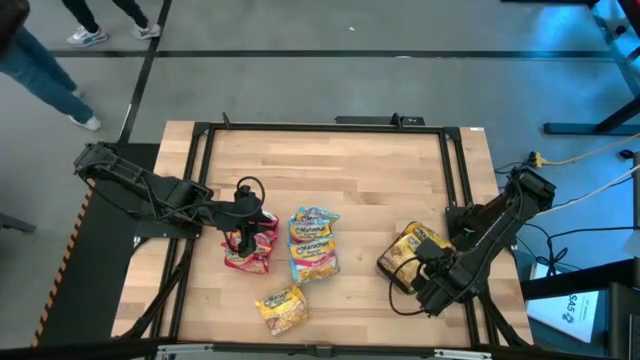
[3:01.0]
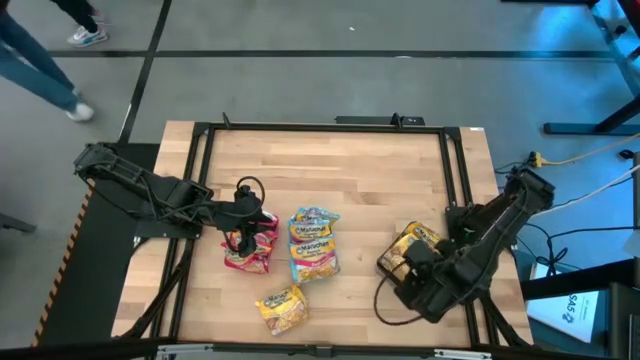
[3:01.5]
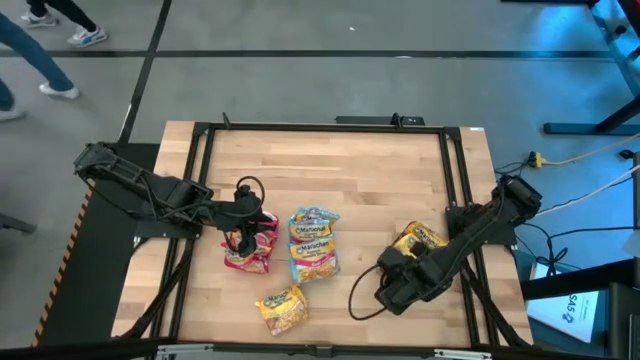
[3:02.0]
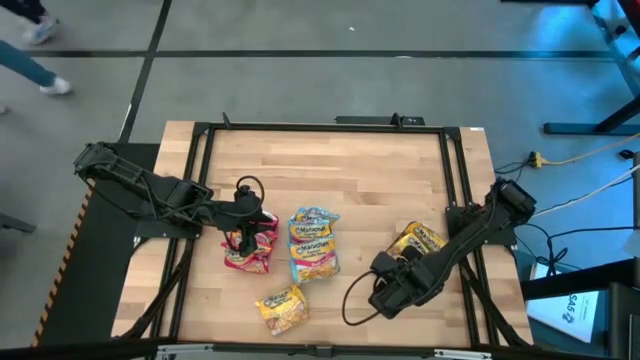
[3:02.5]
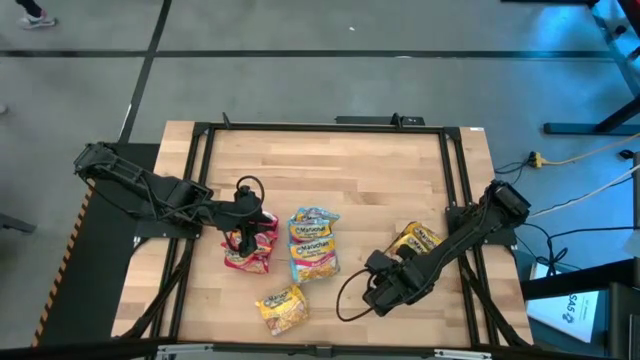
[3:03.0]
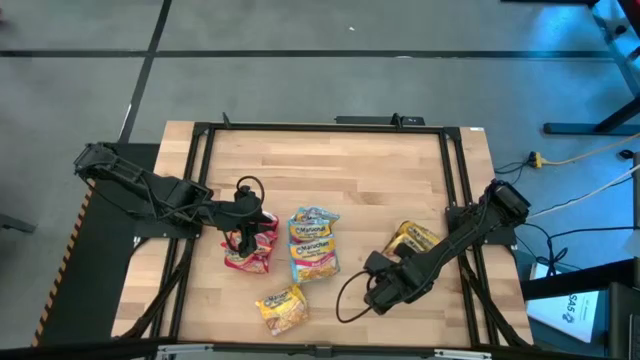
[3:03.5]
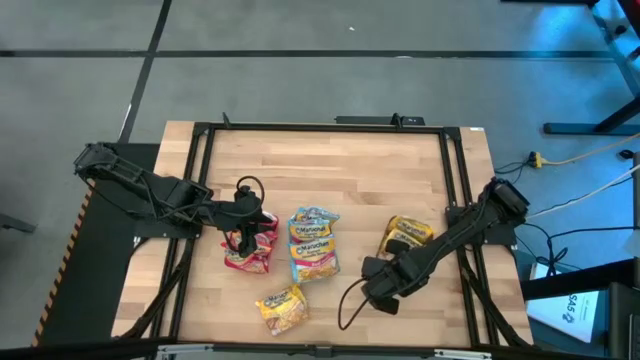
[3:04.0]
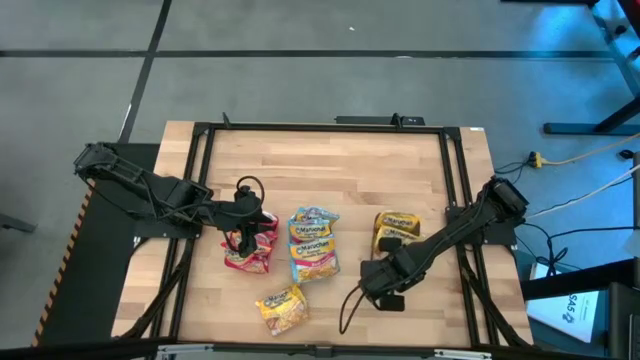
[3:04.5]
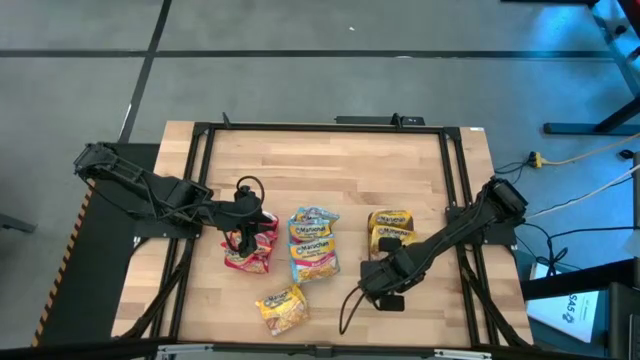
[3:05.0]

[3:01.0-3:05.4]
Task: Sort Maruchan noodles
Adjust the black bin

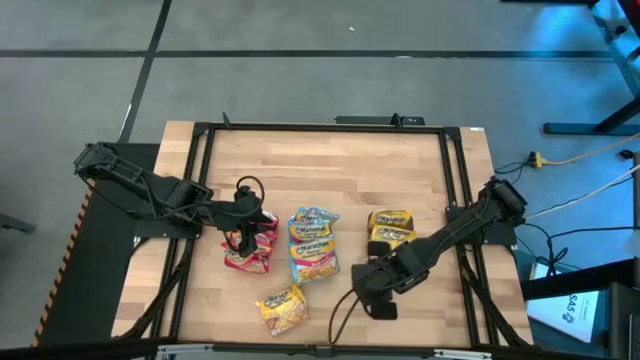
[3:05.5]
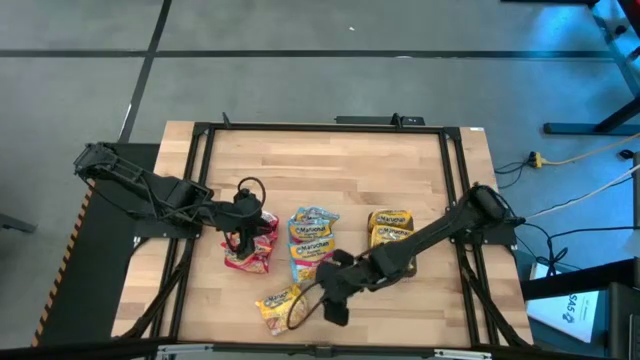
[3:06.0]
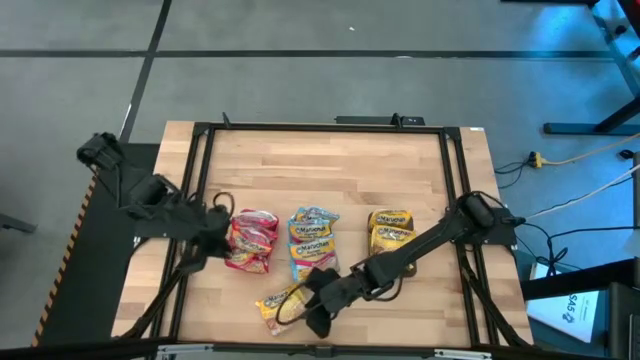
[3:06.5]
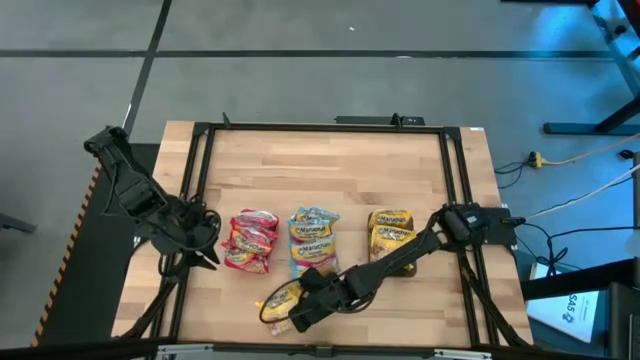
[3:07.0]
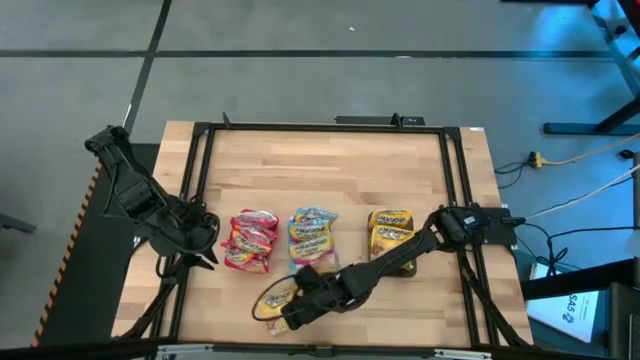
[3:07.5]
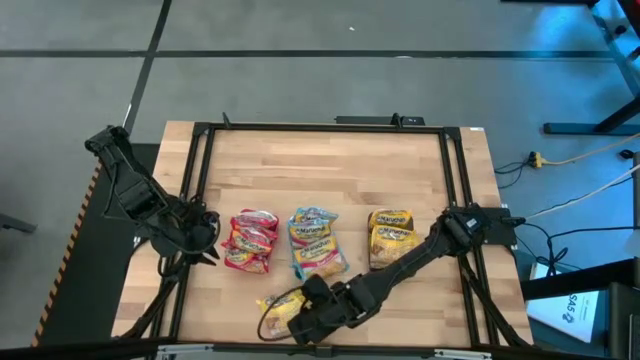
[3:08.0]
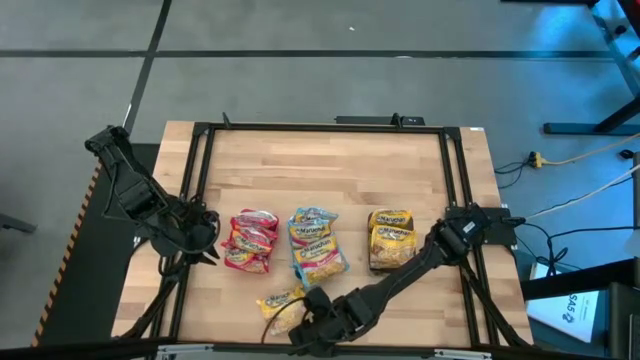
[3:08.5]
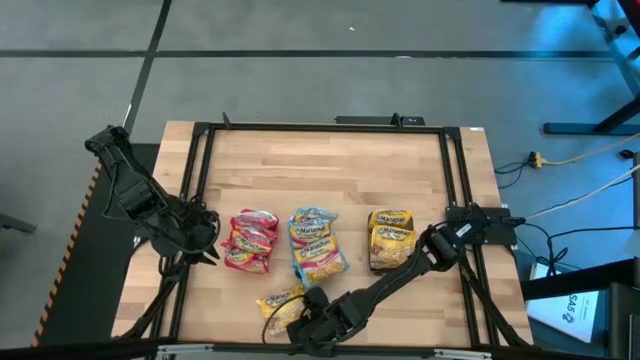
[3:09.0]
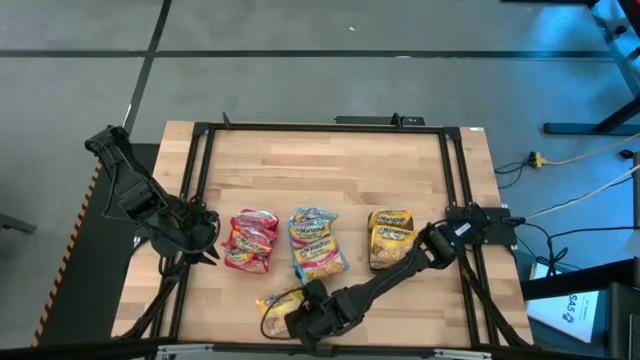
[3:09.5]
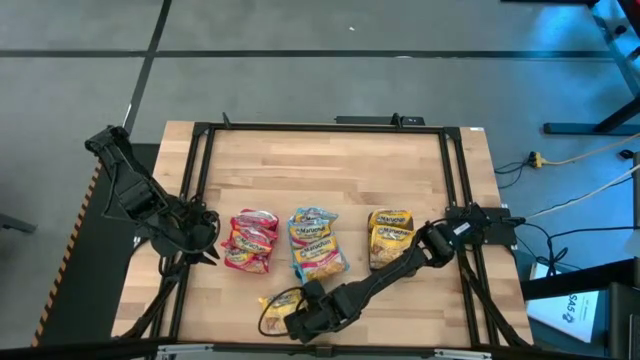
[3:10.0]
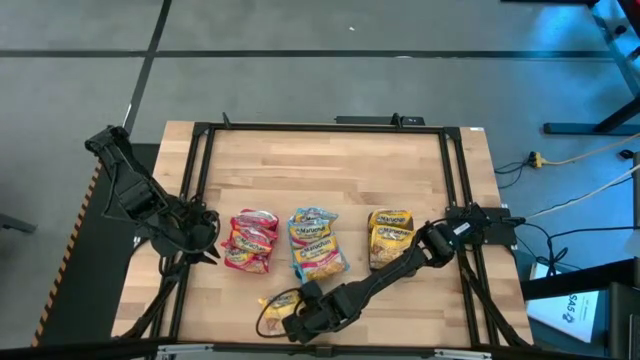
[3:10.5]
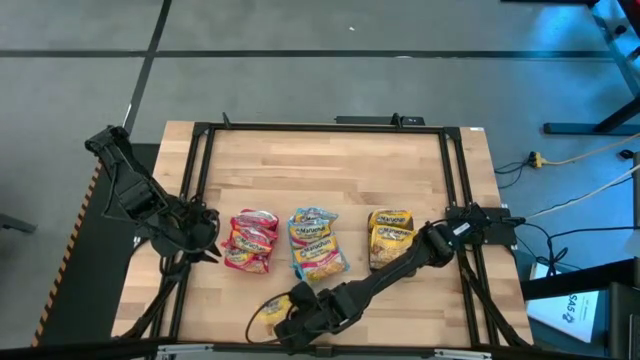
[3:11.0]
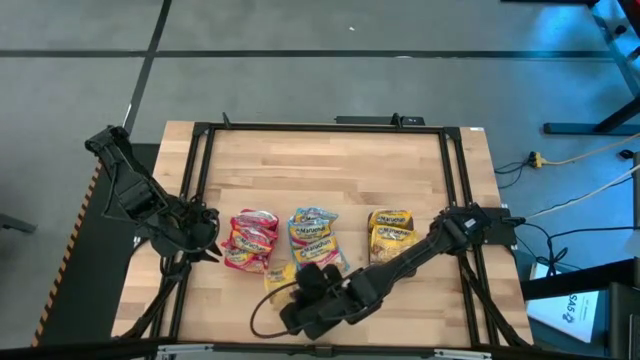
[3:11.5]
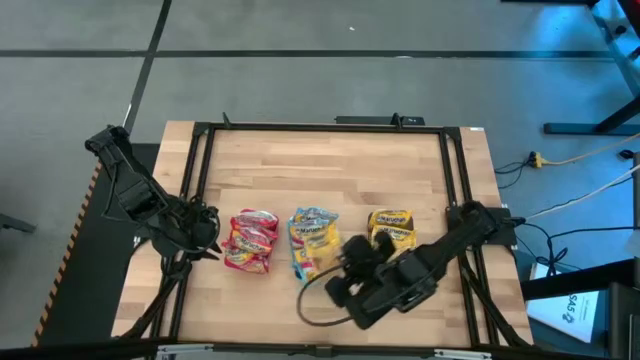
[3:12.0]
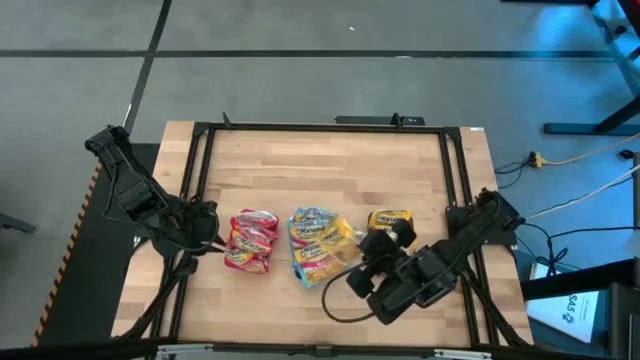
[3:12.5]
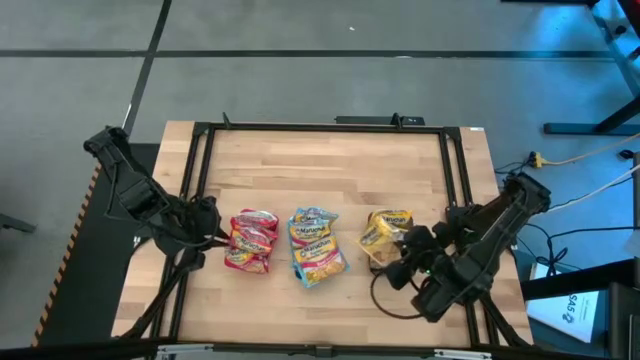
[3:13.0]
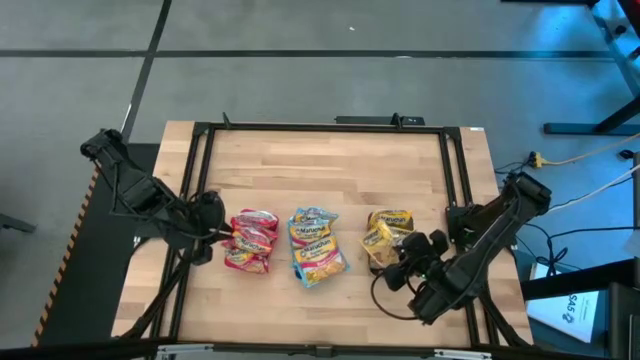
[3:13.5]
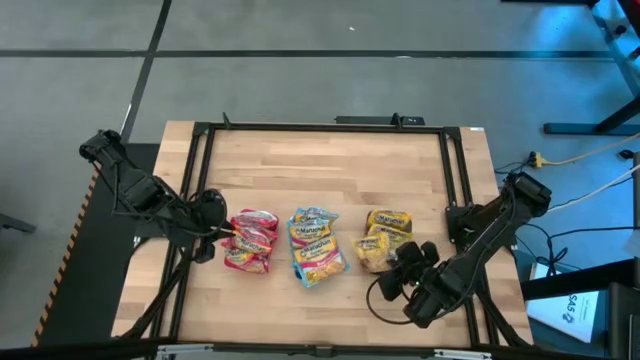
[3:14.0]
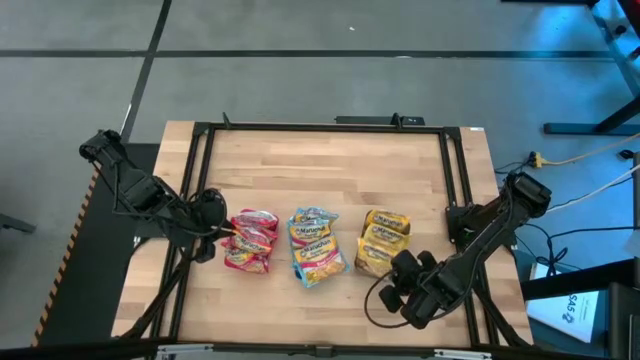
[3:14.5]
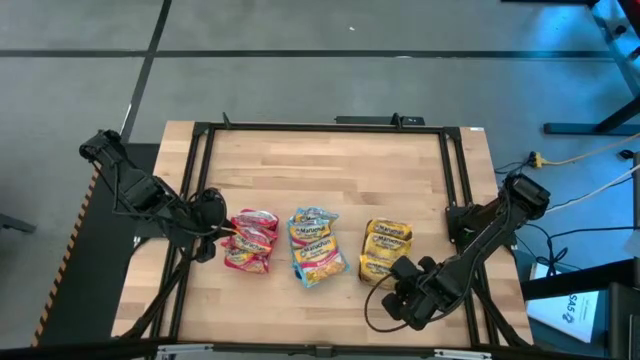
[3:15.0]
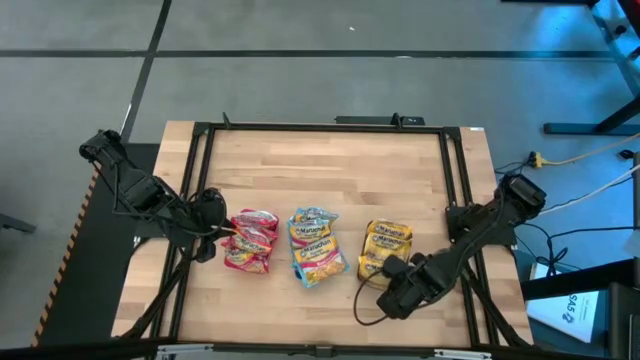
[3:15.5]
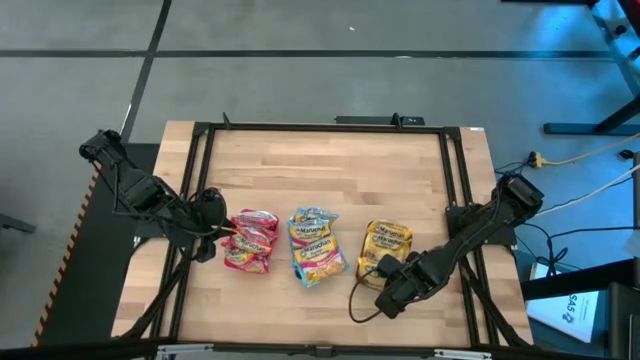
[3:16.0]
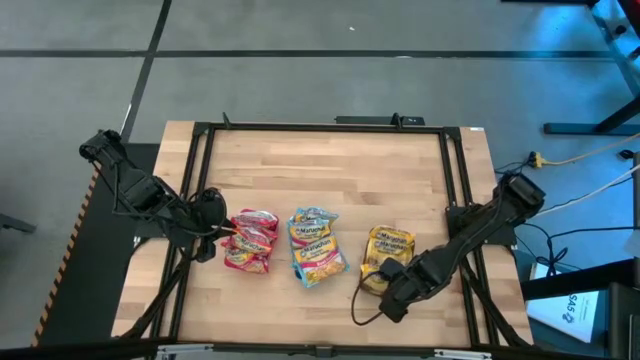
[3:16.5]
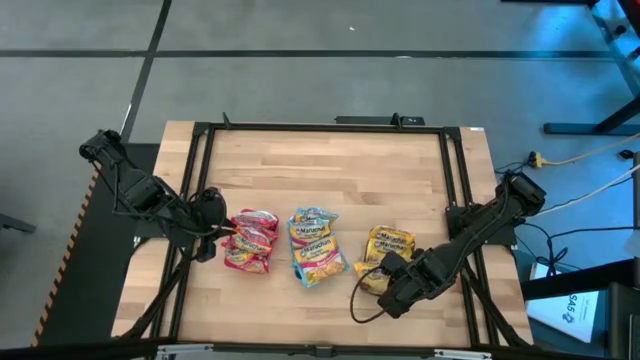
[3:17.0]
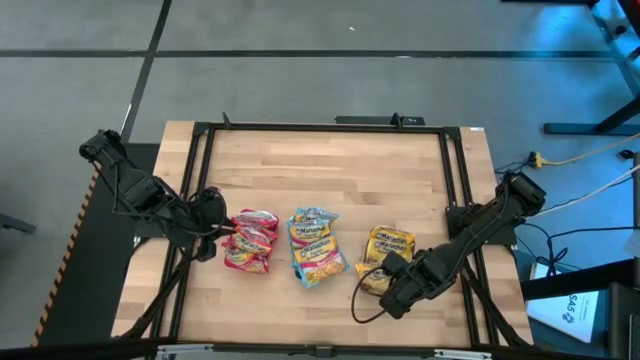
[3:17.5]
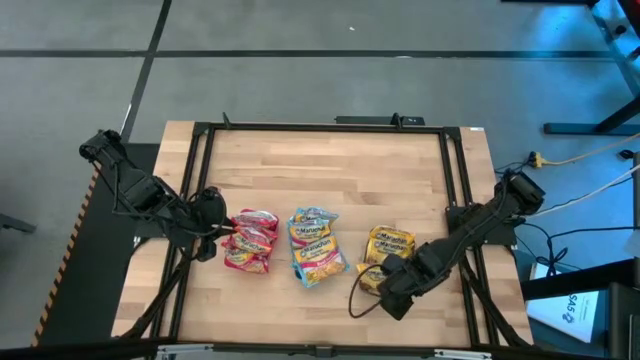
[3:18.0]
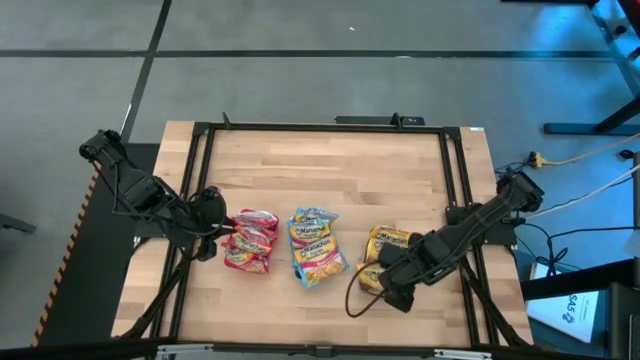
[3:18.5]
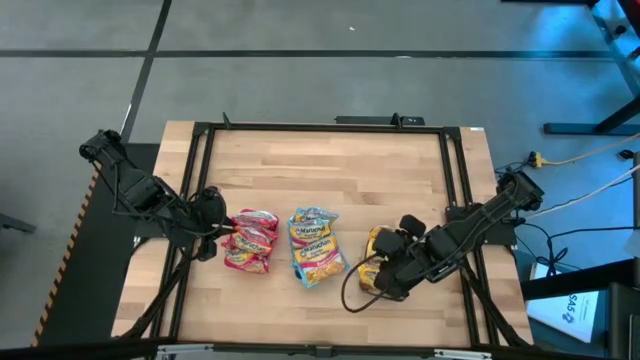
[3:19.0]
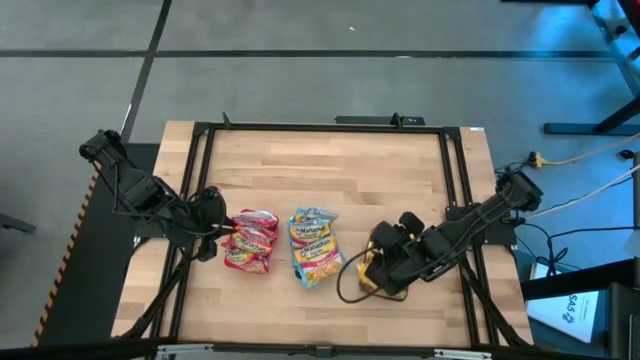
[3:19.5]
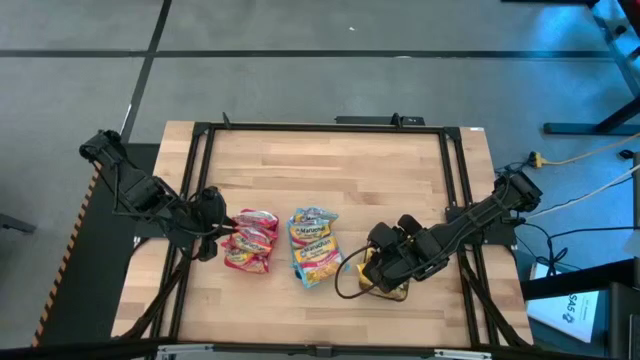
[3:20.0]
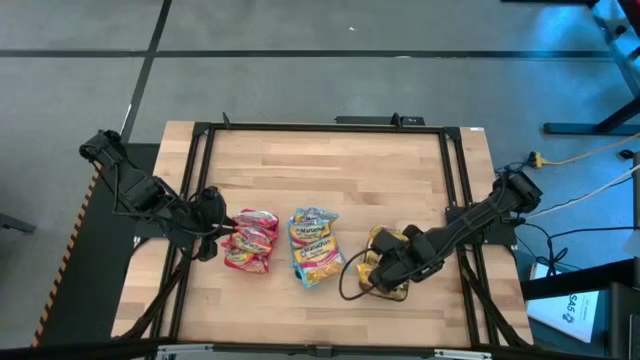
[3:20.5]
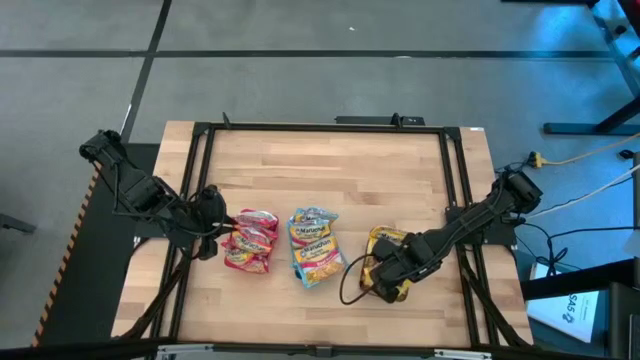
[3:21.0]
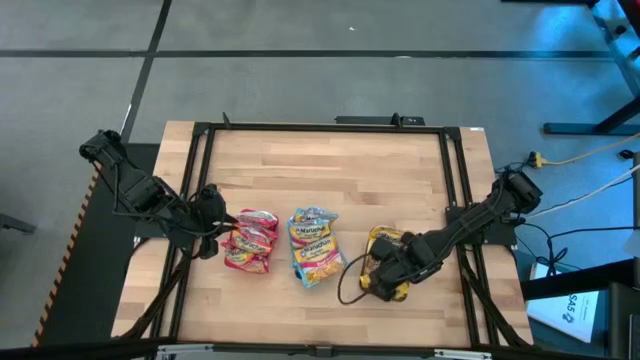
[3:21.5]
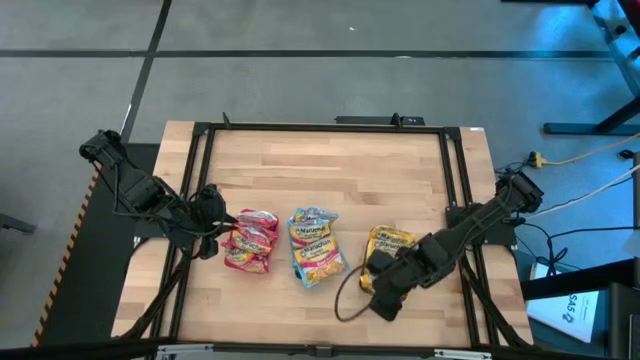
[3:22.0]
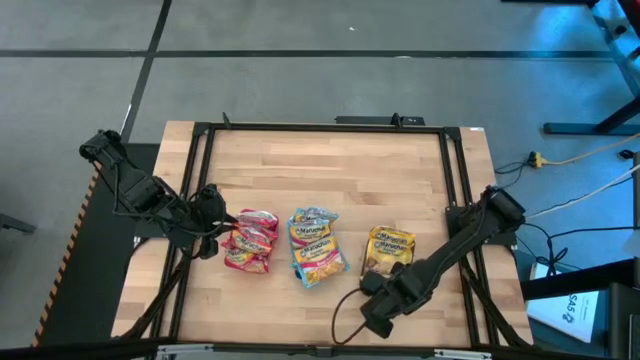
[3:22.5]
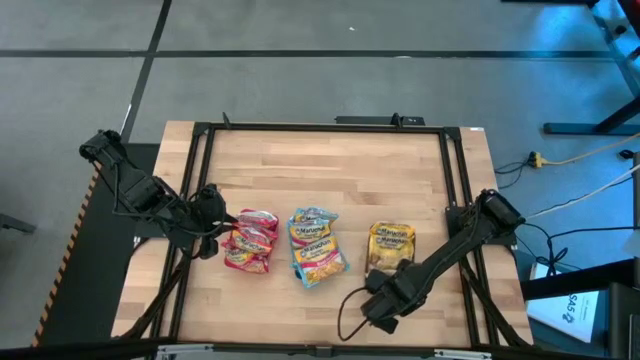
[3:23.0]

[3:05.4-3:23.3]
Put the yellow noodle pack into the black bin
